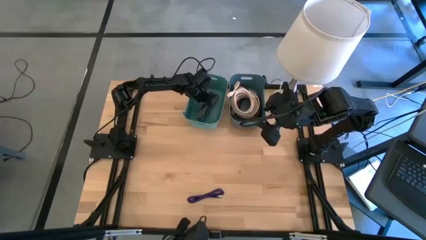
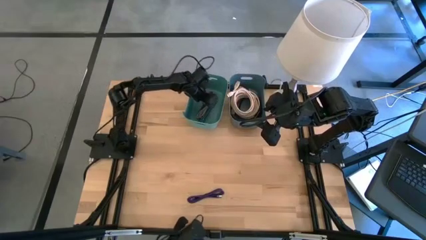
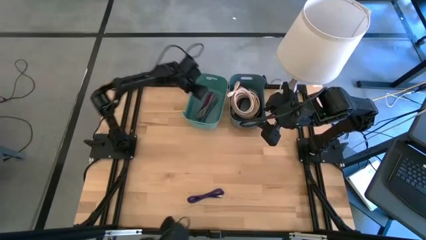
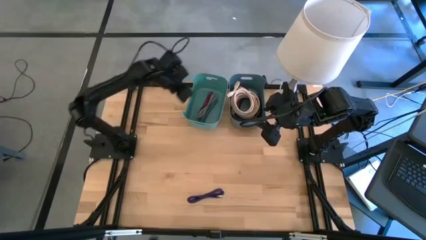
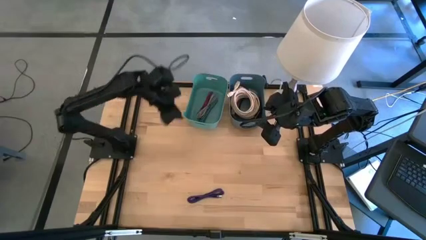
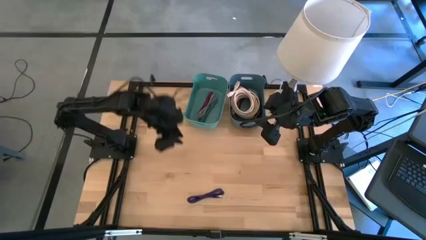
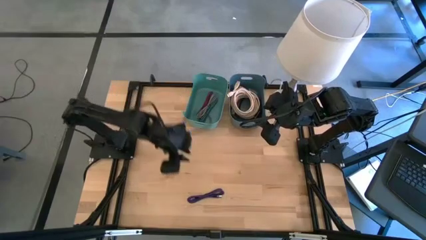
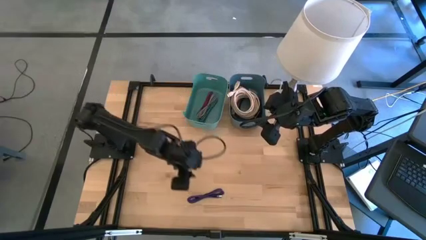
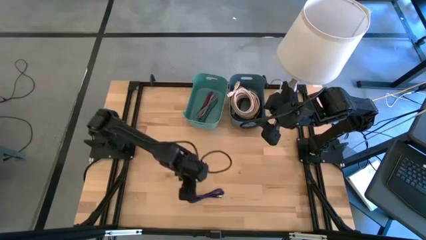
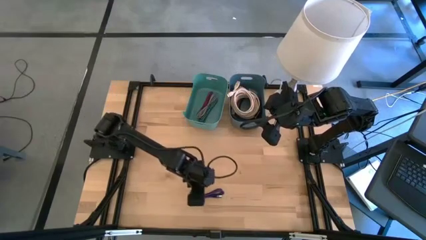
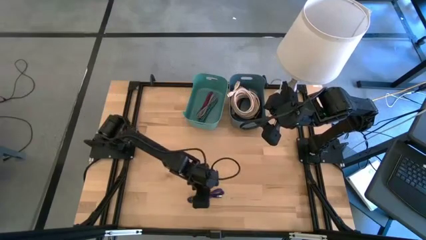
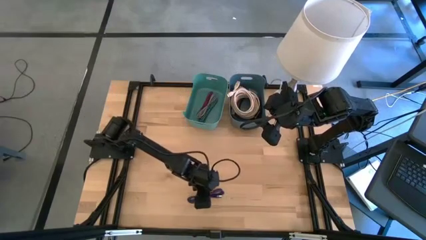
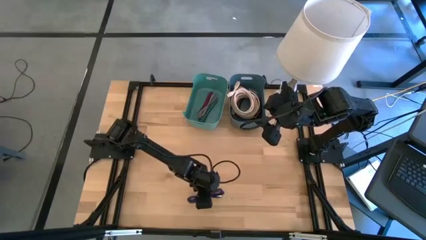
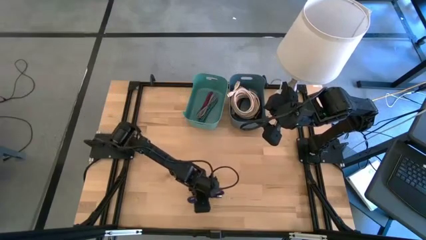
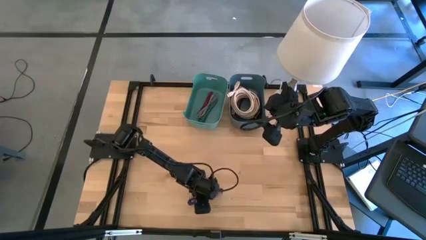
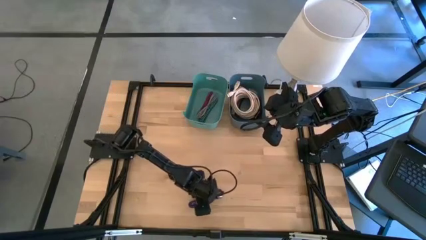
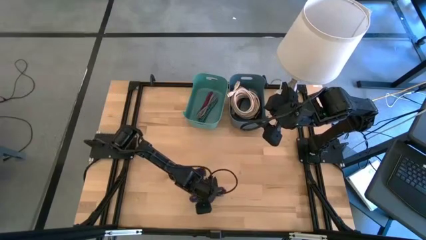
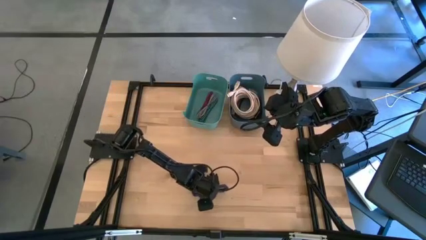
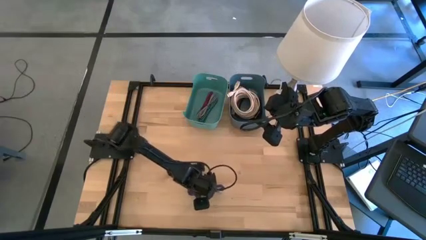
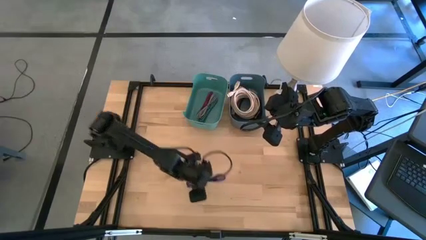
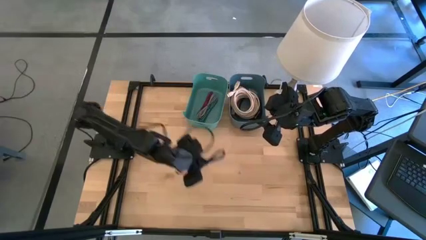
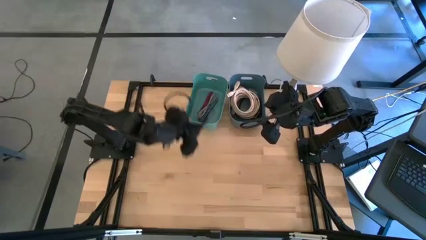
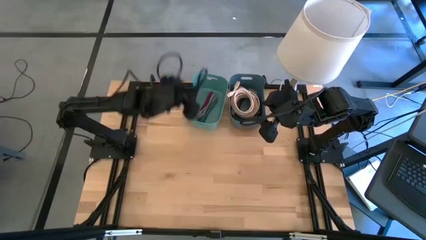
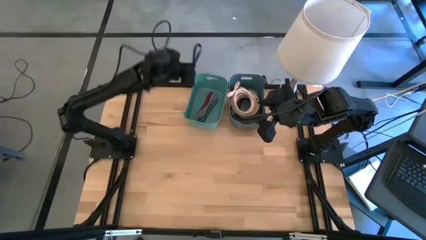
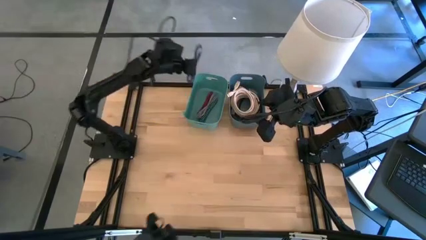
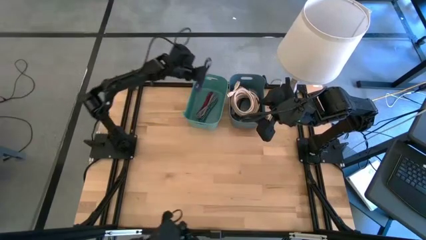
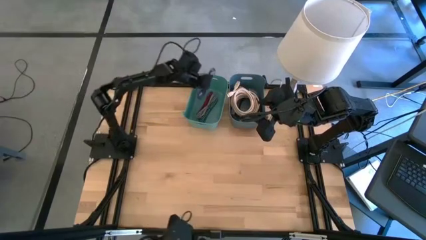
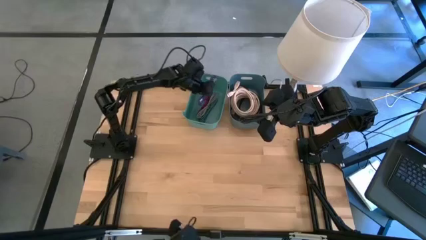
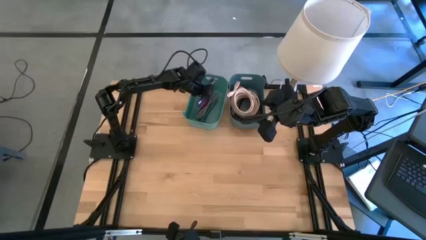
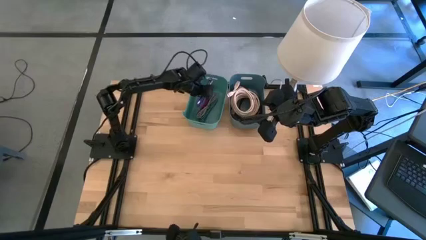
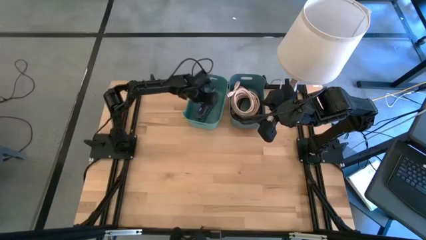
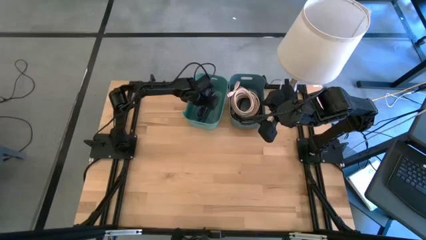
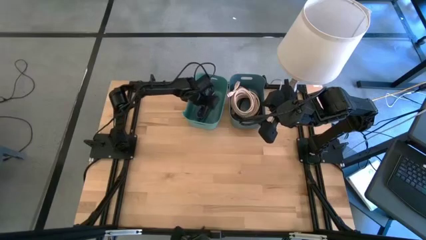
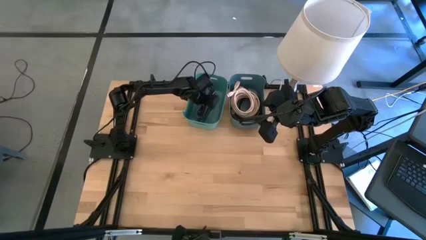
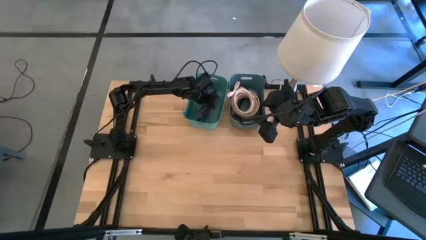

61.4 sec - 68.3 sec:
Put the purple USB cable into the green bin

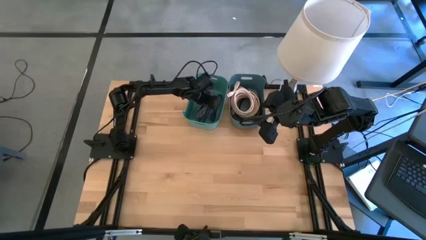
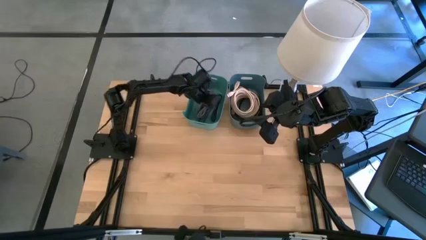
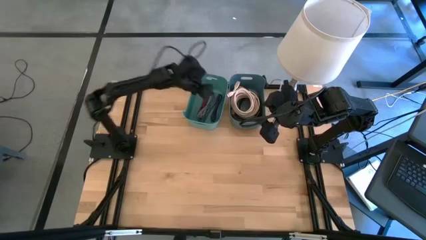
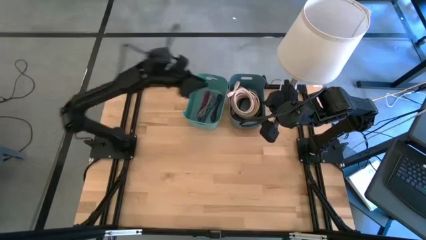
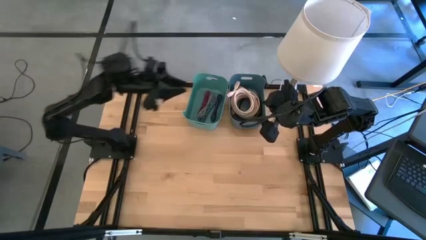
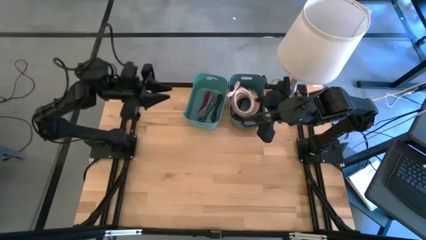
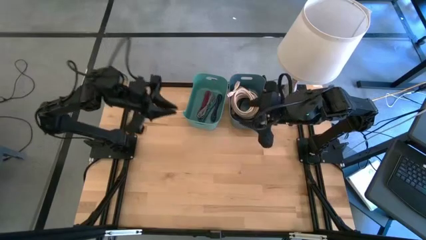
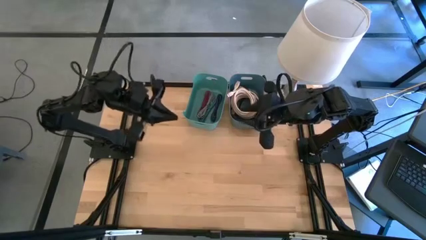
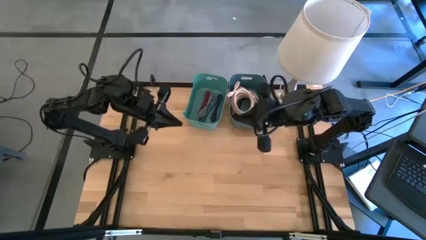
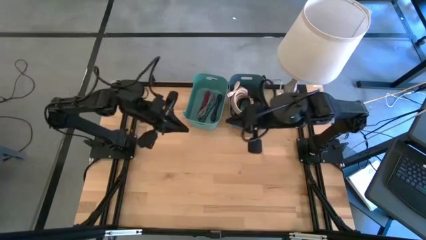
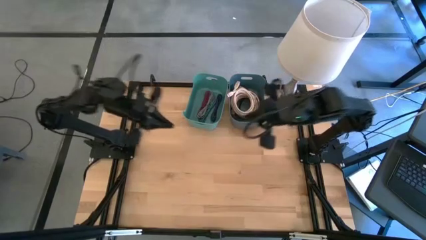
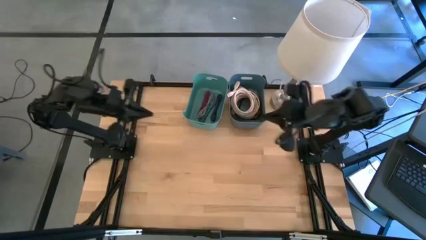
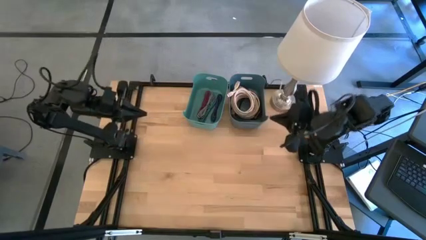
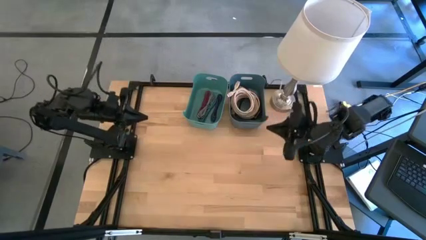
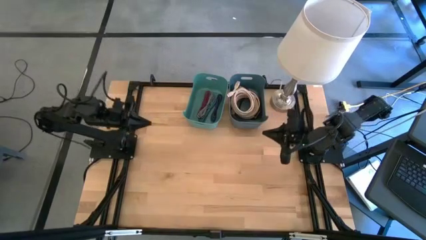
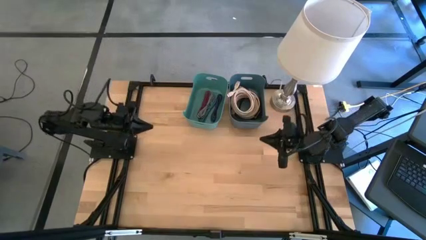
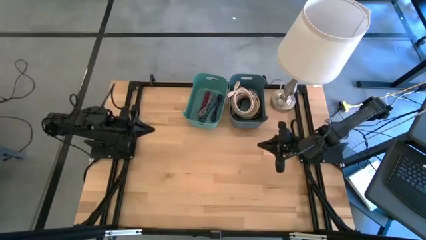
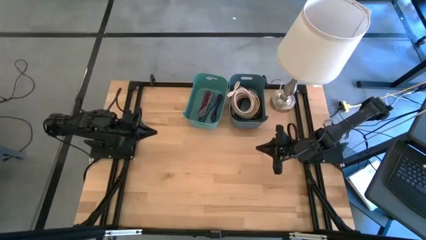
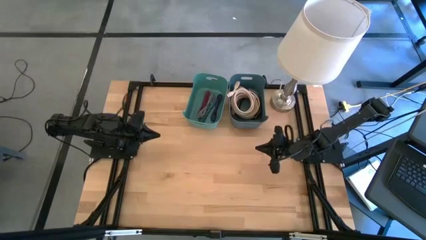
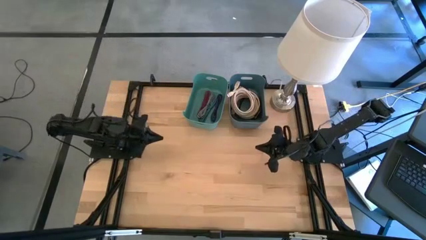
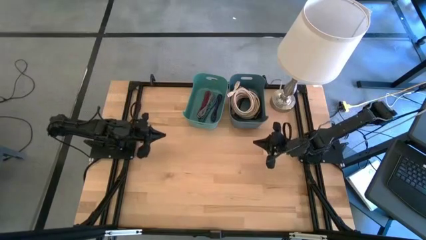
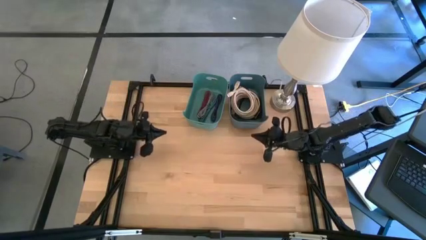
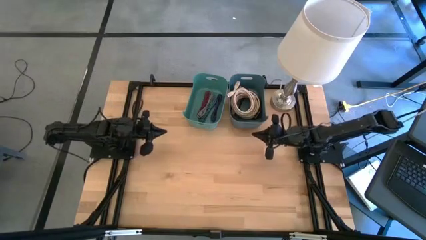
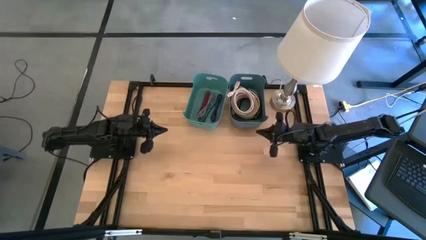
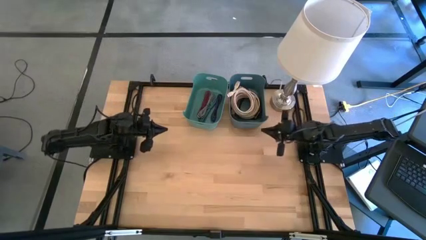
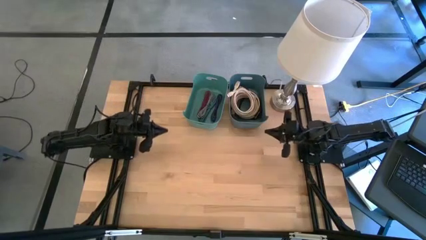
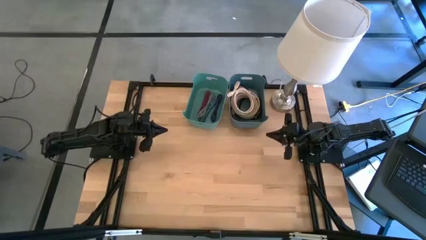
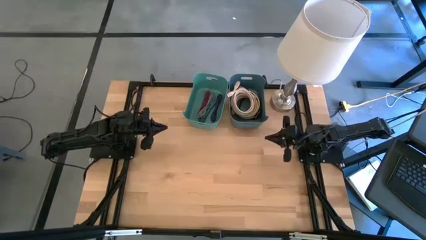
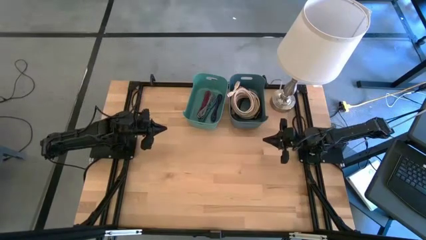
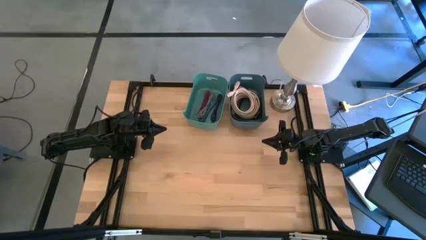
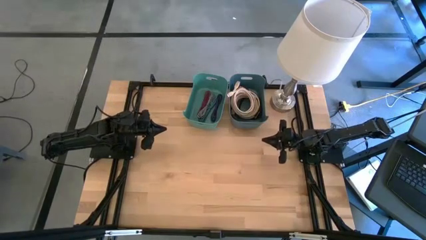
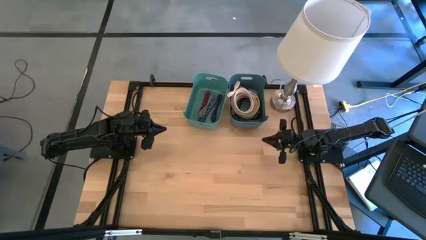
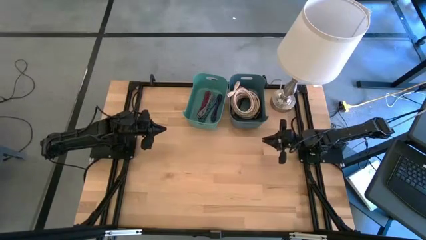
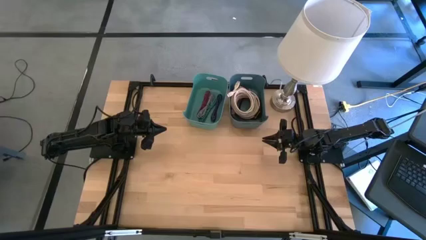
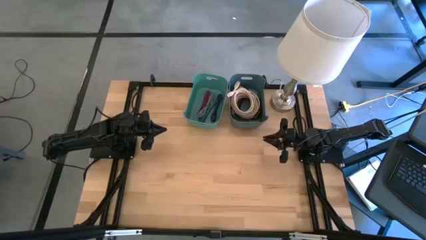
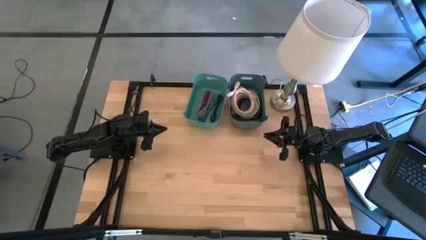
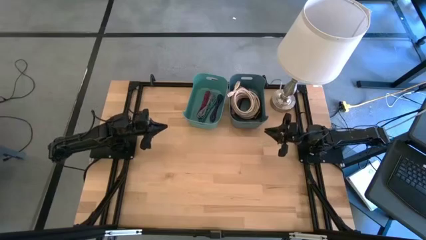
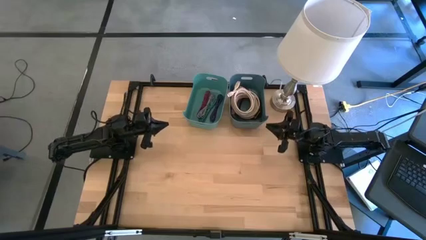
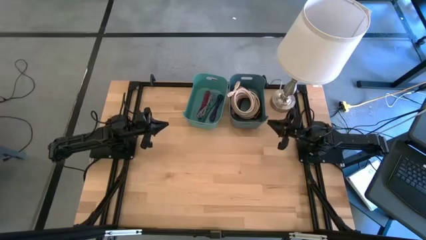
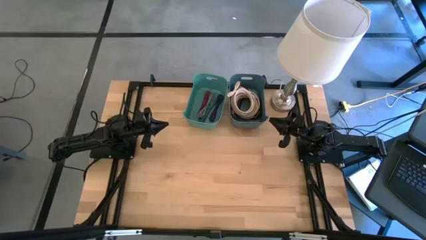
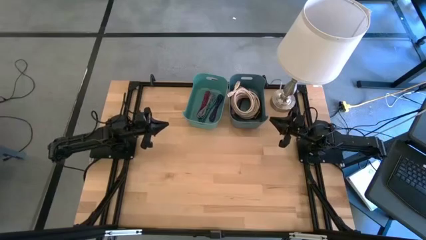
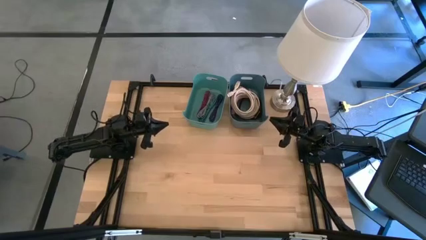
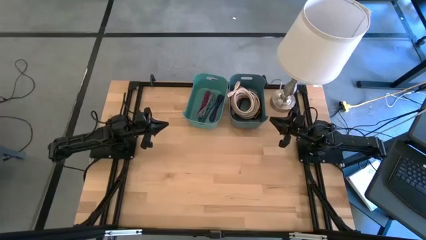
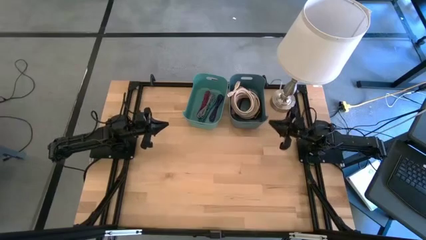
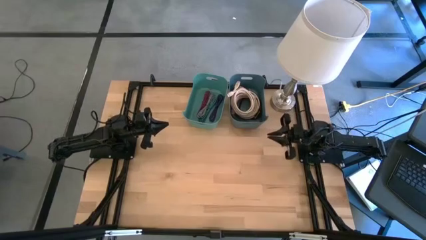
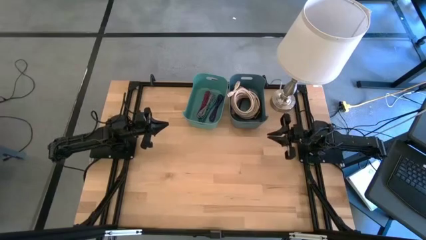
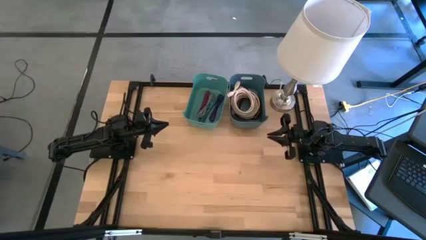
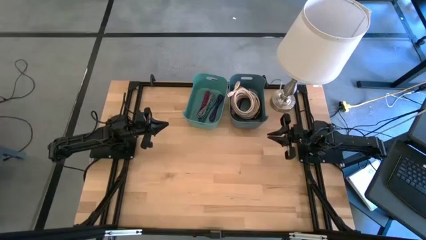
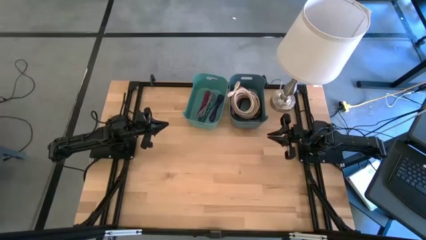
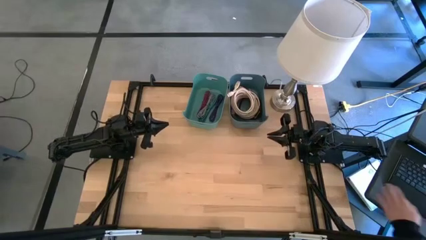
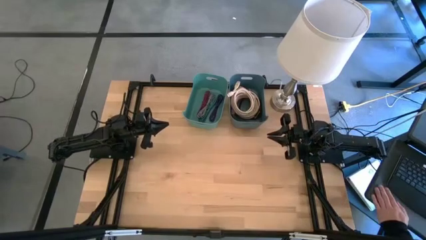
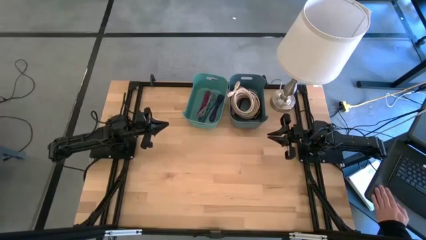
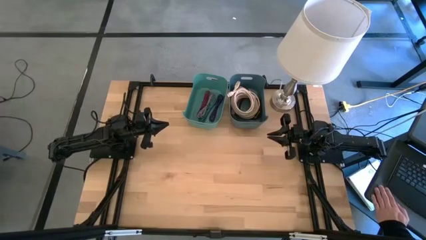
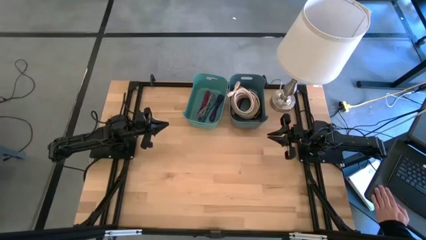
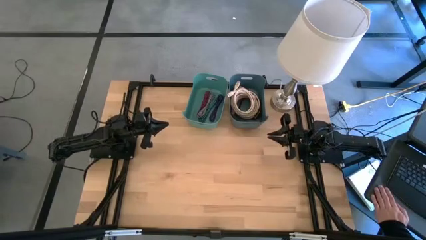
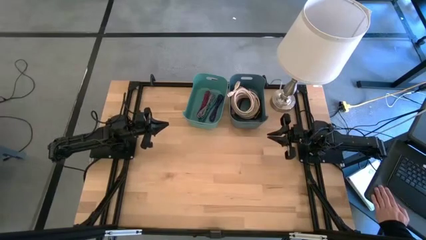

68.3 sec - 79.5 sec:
Return to Home Position
